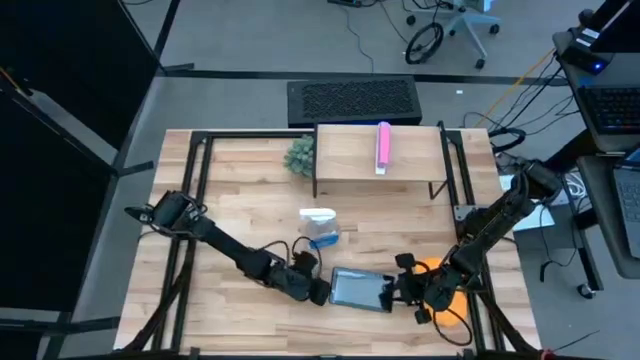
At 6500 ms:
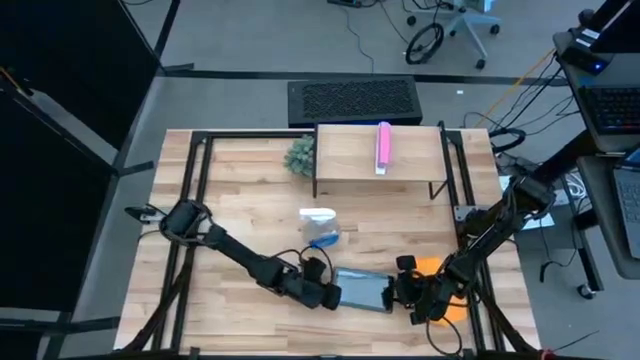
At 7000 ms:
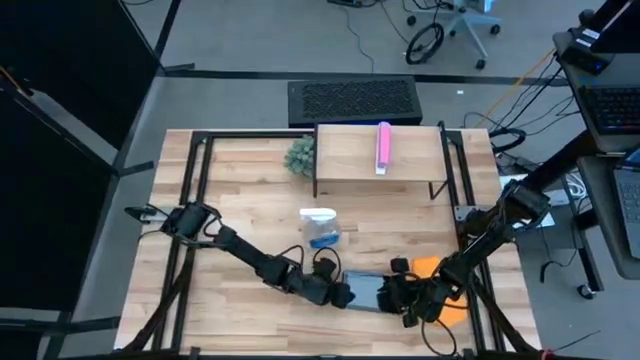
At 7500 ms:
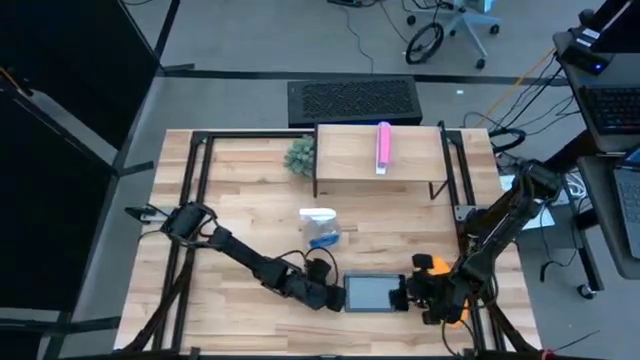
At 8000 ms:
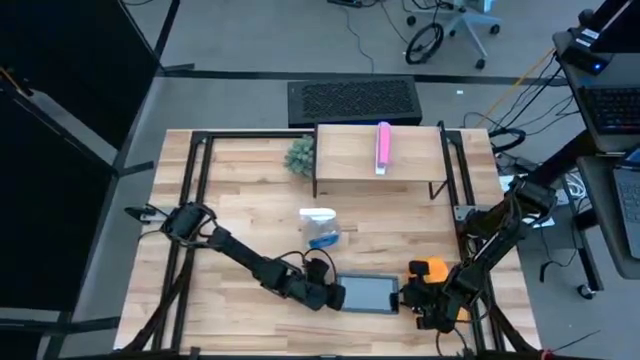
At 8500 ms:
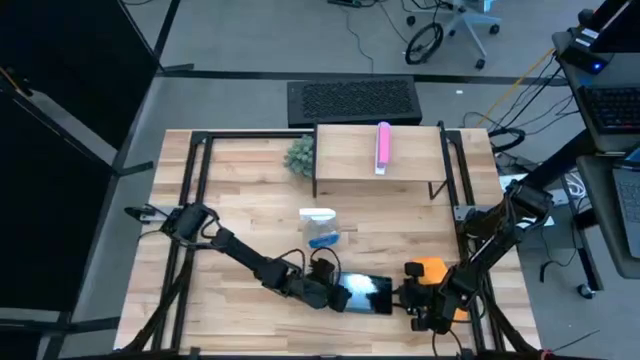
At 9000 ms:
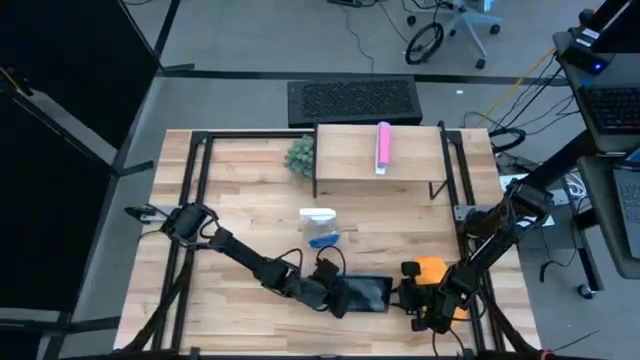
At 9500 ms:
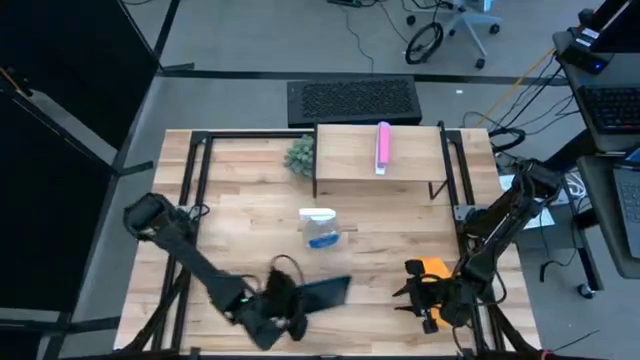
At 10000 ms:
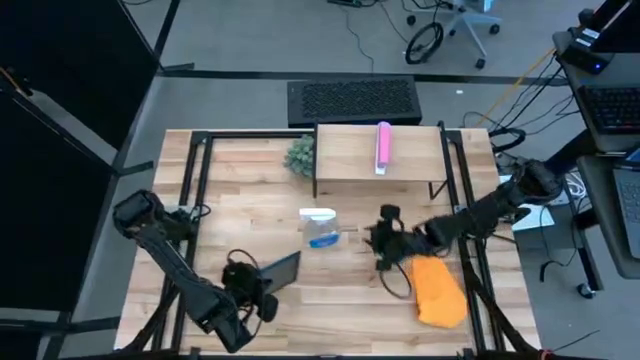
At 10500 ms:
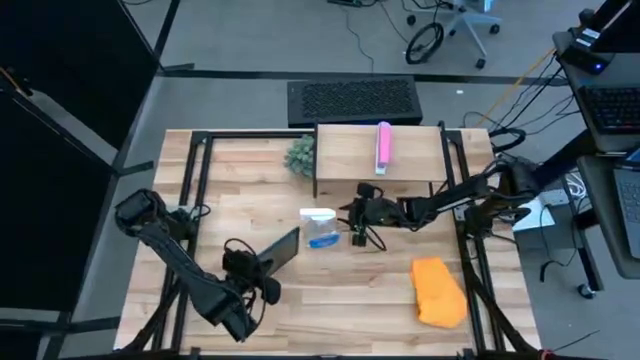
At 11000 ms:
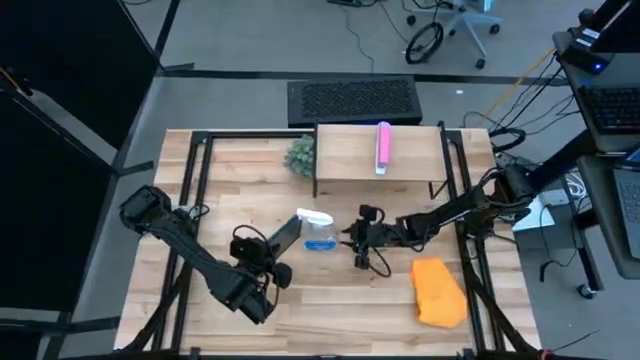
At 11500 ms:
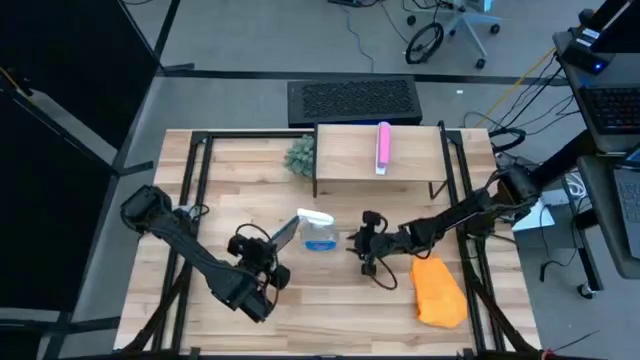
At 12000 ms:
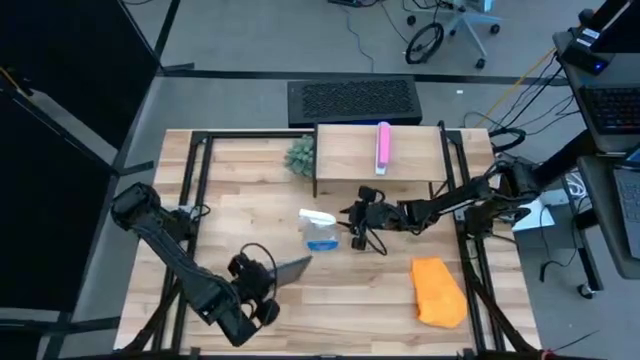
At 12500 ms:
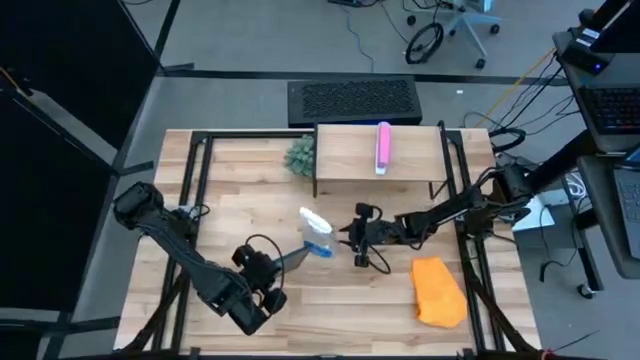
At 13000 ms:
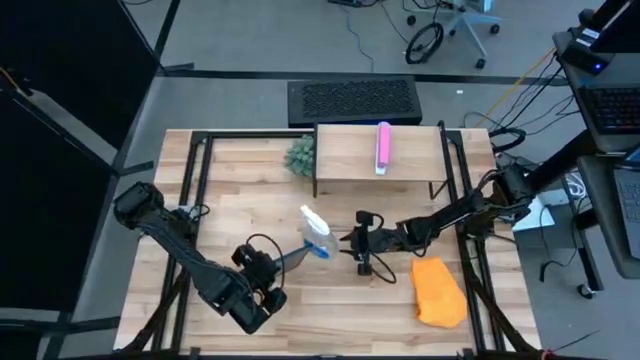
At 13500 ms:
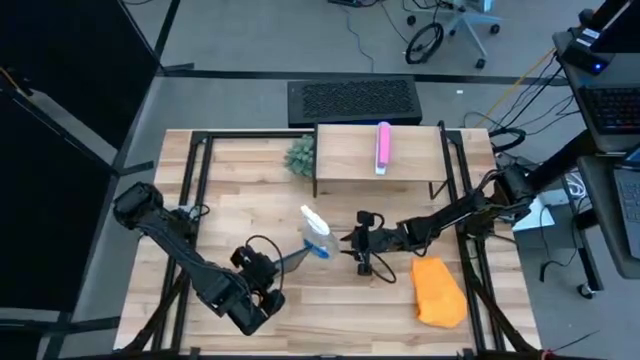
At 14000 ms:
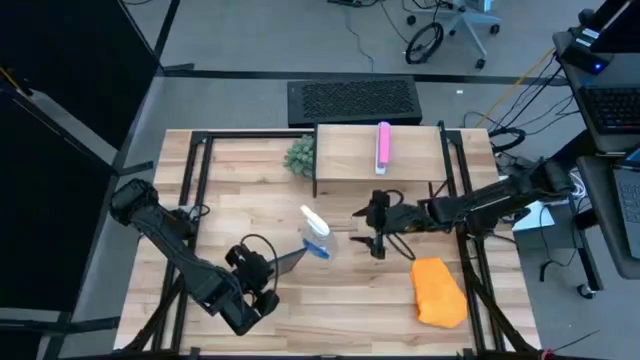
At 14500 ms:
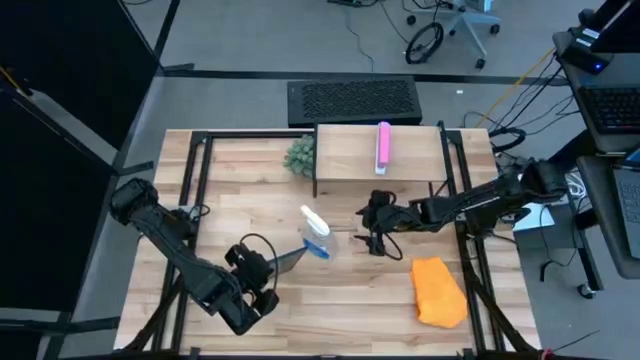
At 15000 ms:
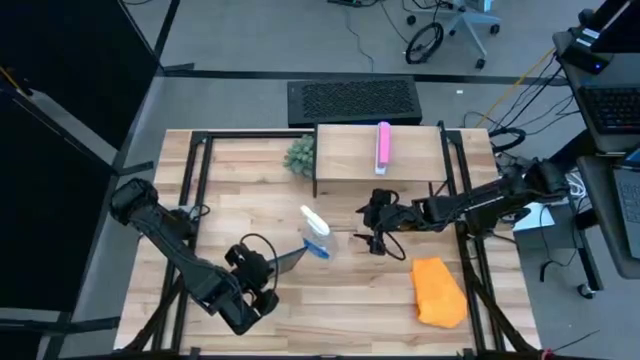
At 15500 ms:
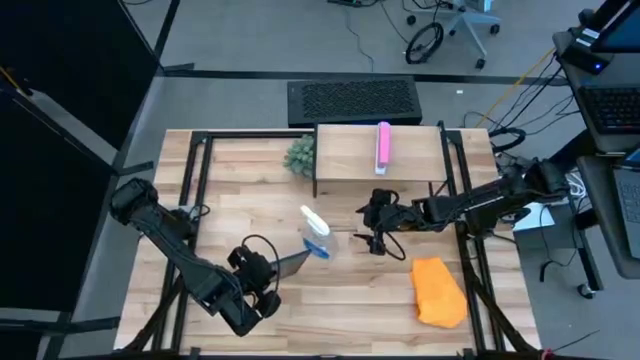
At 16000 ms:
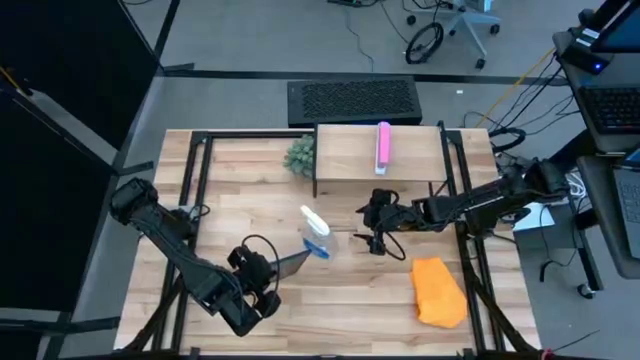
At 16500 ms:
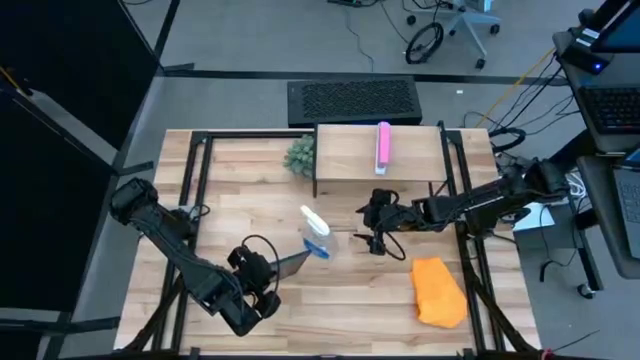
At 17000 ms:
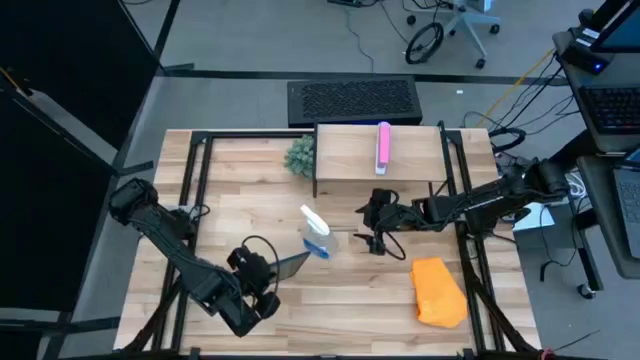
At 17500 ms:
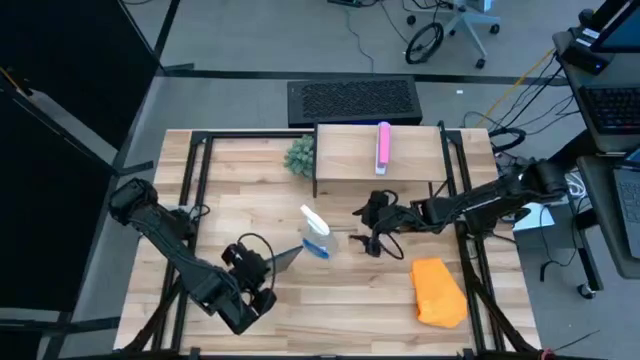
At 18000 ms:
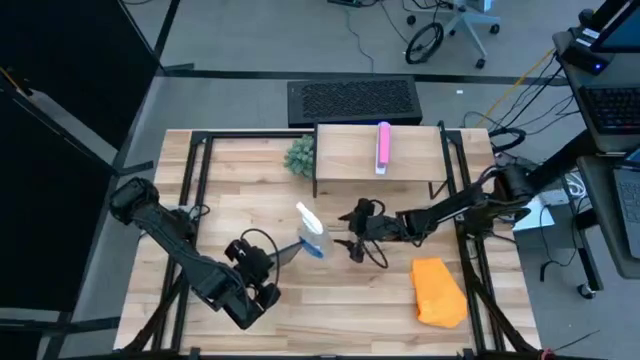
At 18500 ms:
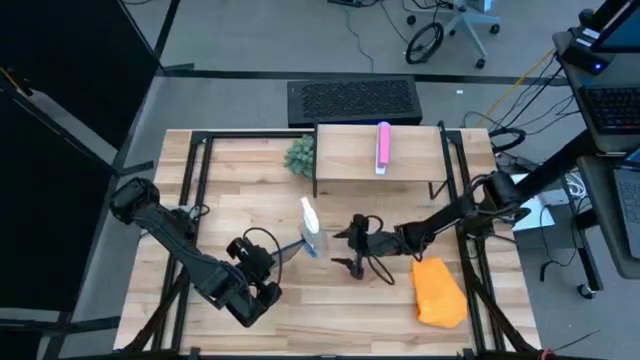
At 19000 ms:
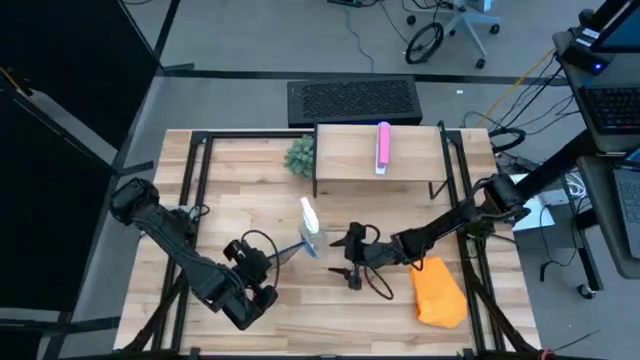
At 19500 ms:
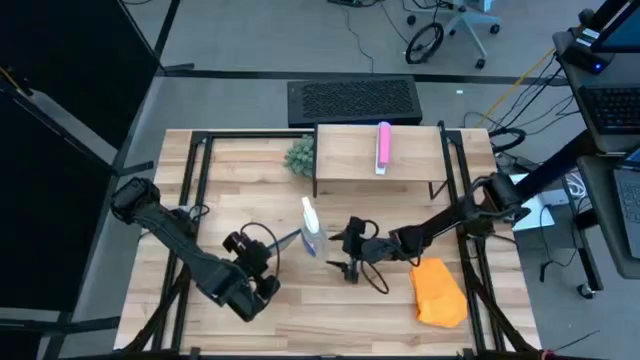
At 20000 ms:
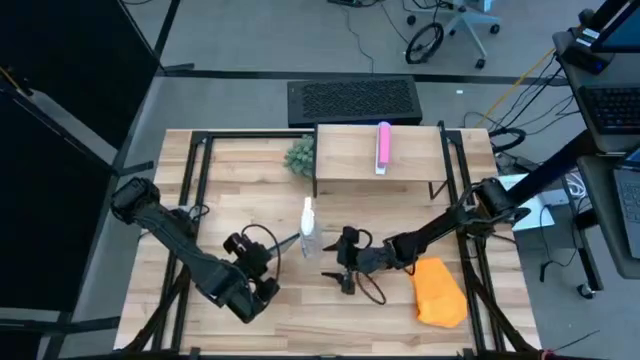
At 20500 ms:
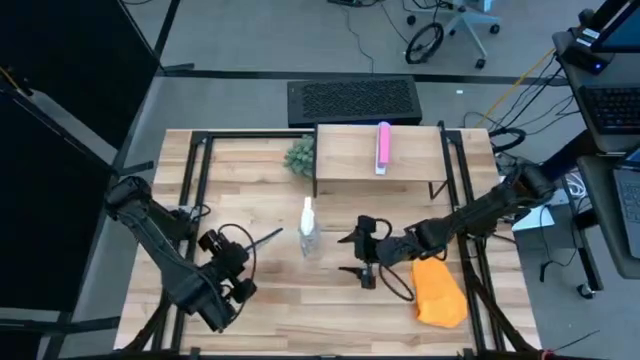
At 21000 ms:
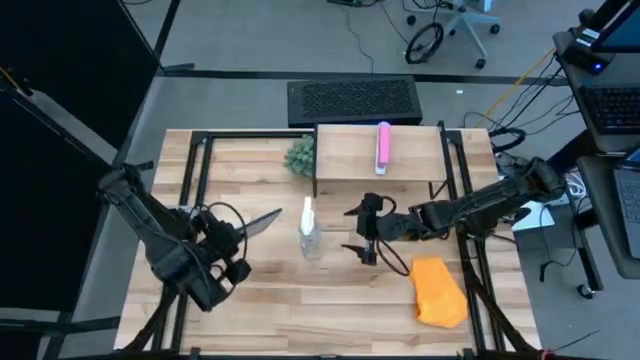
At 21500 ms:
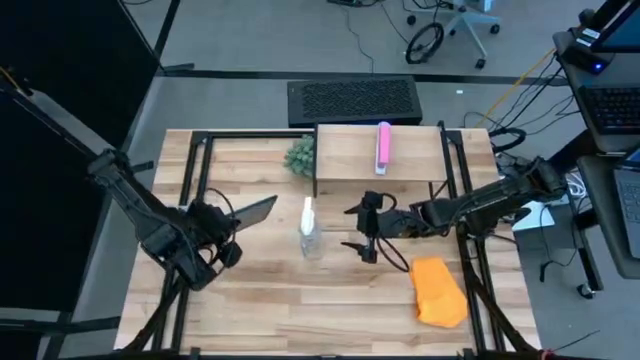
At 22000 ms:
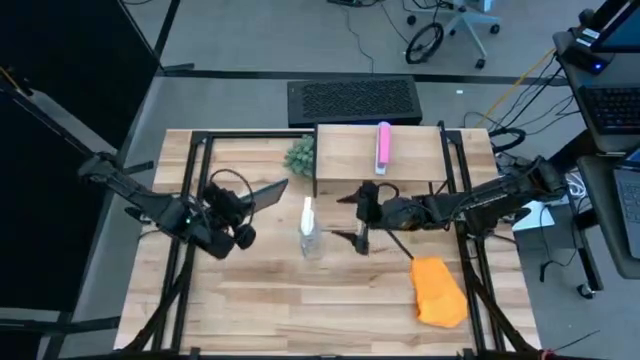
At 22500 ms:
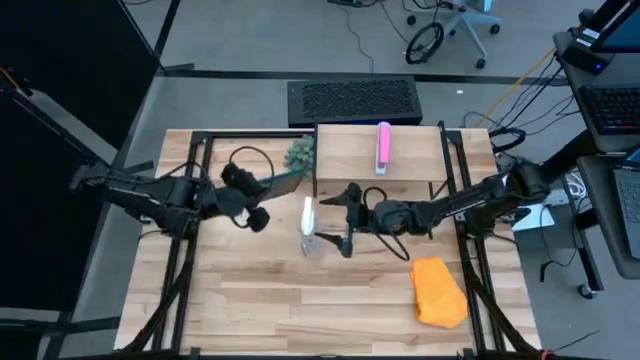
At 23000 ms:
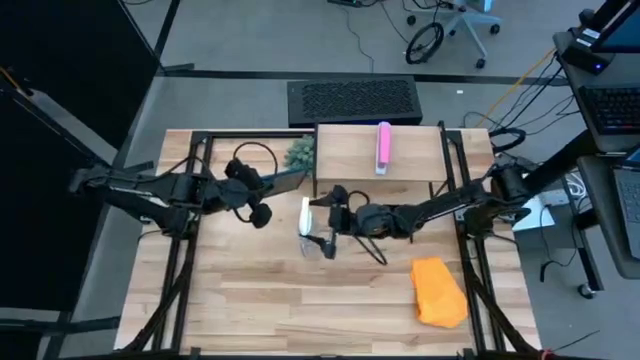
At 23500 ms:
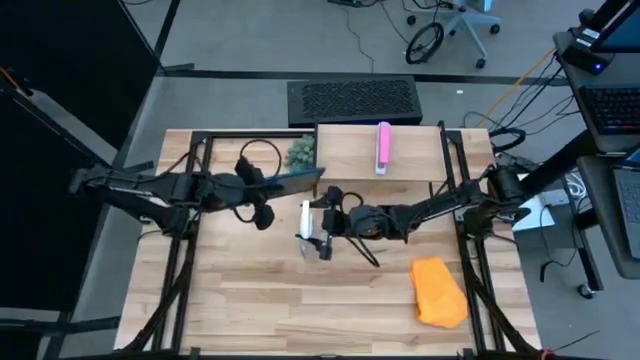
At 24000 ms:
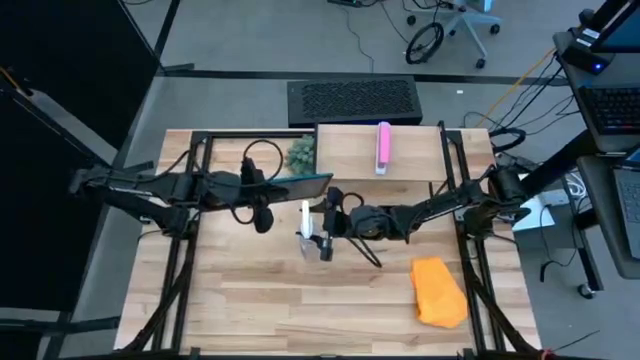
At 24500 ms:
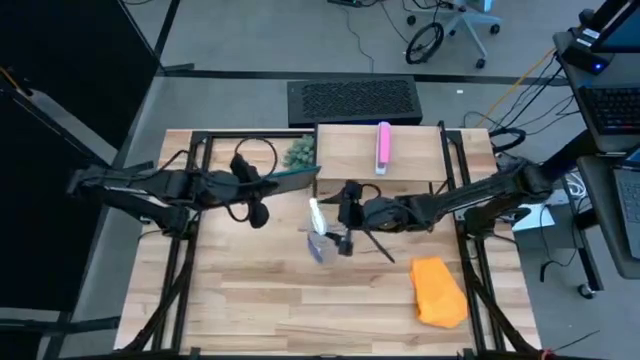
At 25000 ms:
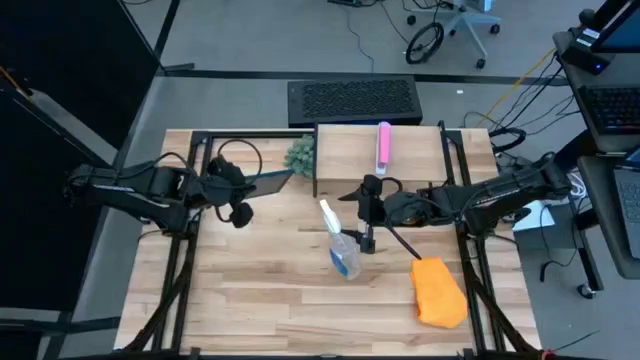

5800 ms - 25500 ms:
Task: Apply microfiber cloth
Spray the tablet with the spray bottle
